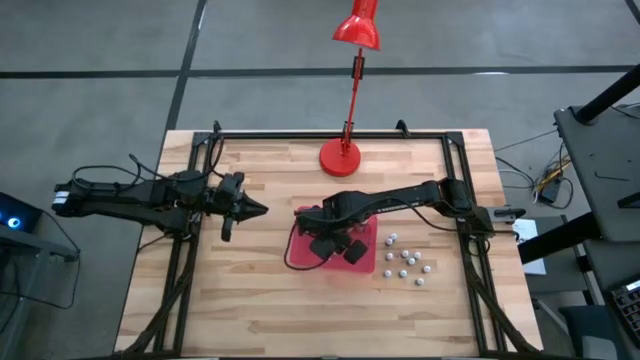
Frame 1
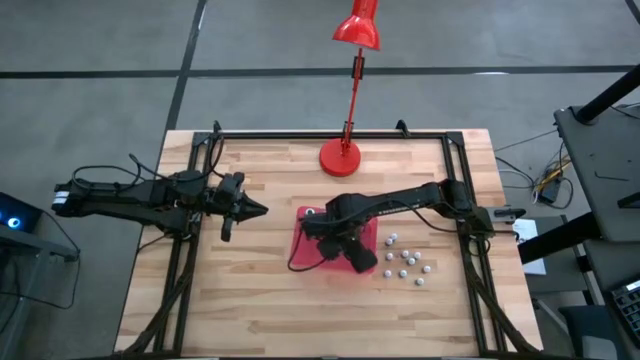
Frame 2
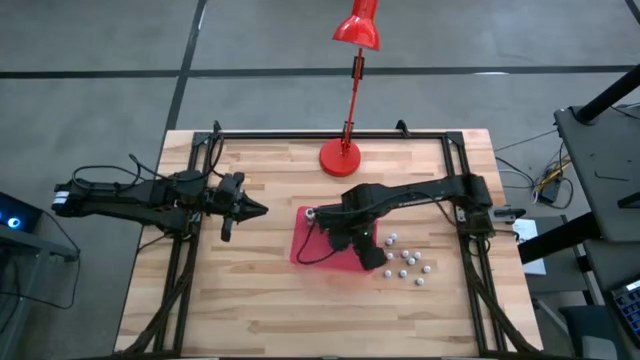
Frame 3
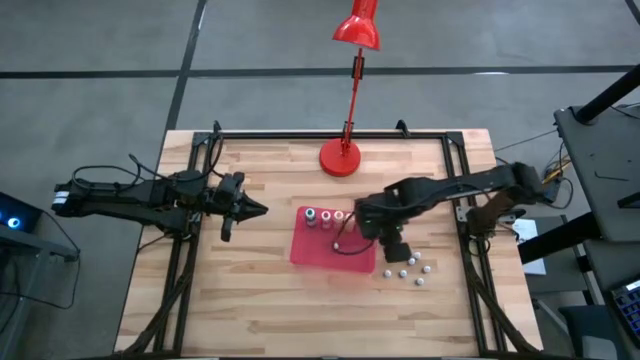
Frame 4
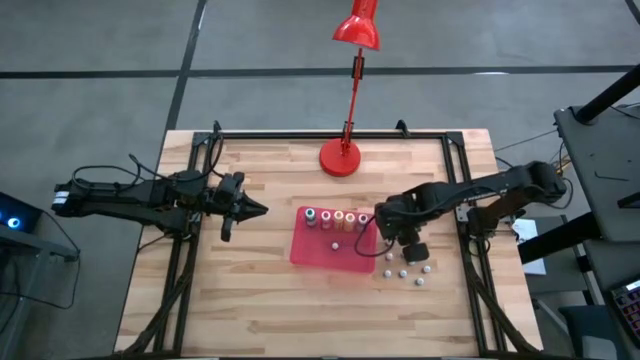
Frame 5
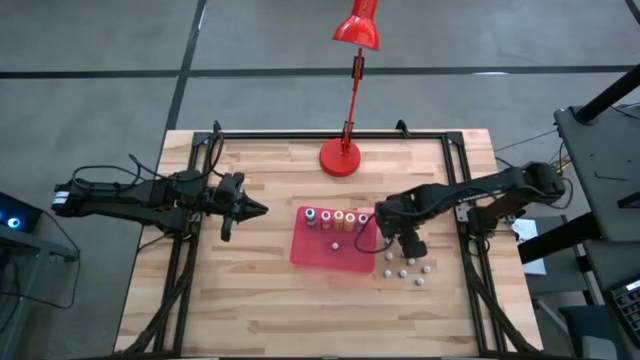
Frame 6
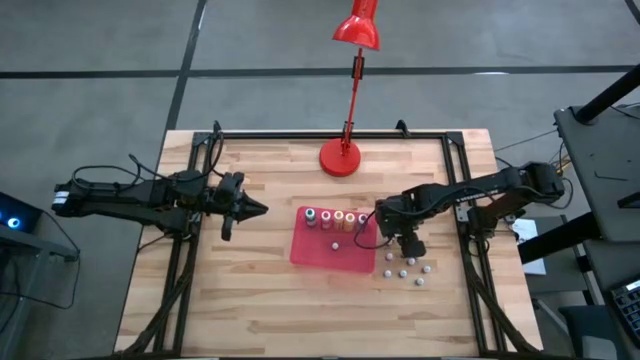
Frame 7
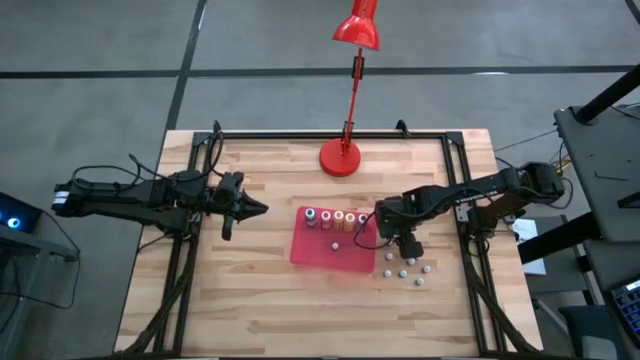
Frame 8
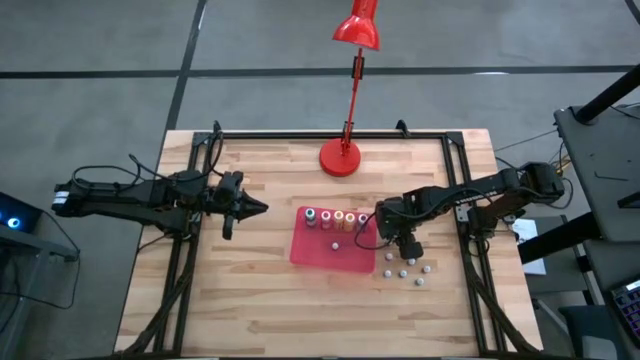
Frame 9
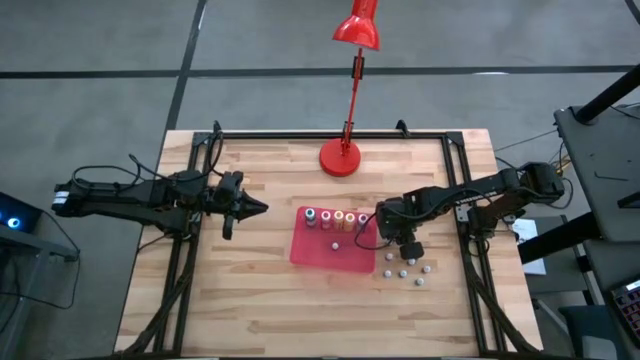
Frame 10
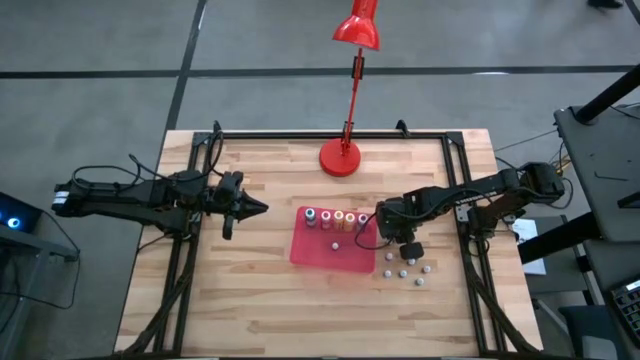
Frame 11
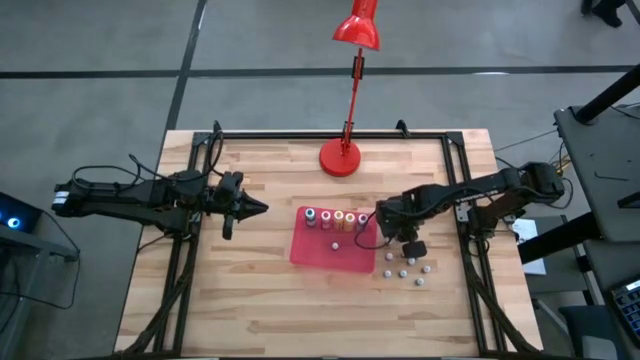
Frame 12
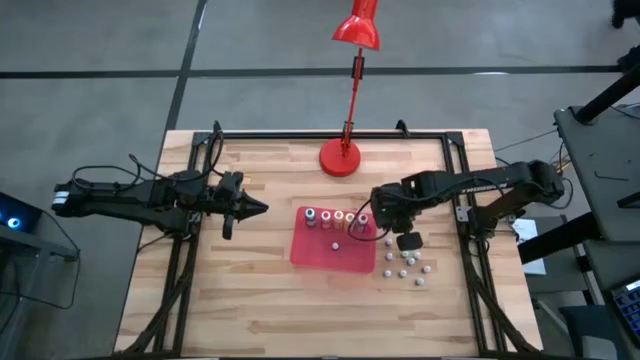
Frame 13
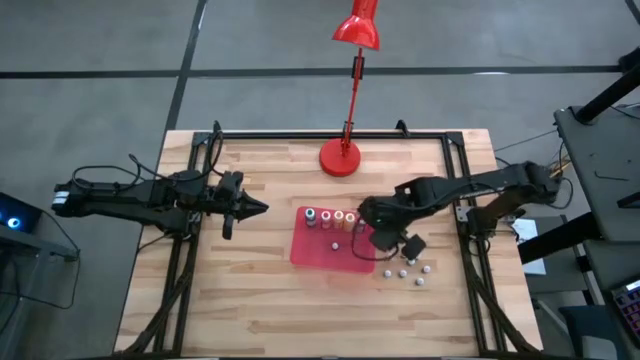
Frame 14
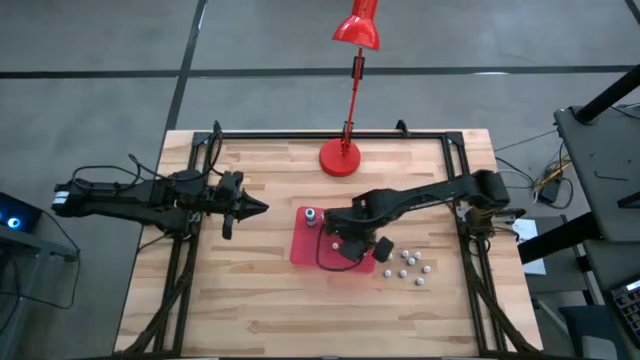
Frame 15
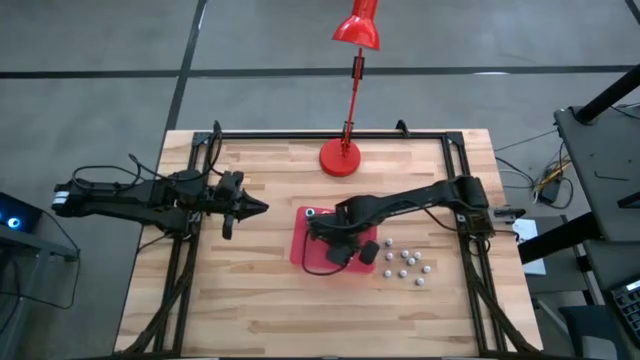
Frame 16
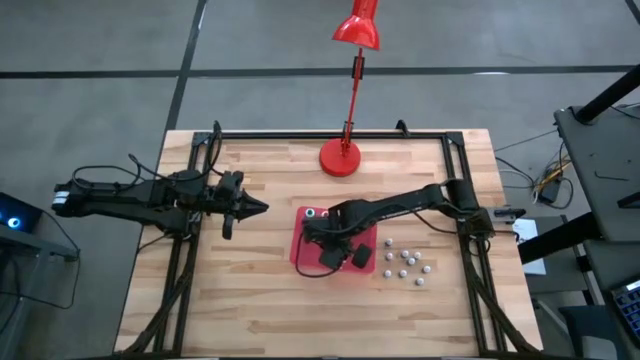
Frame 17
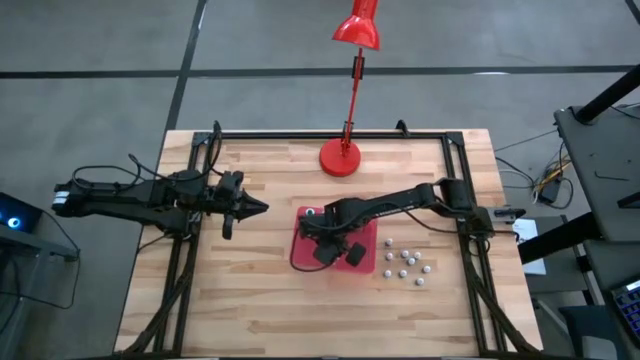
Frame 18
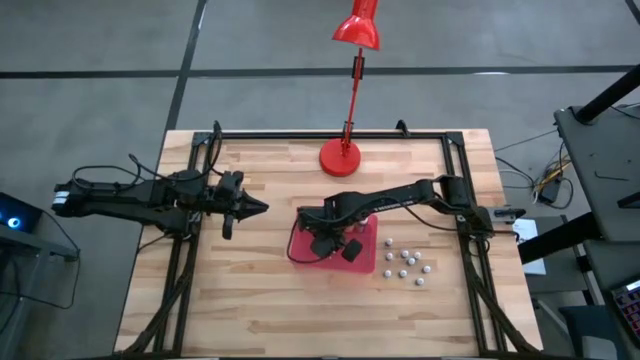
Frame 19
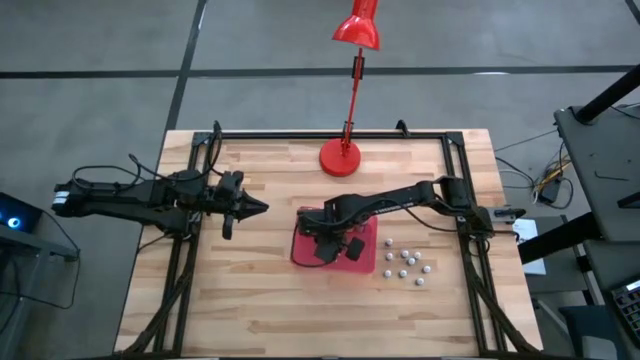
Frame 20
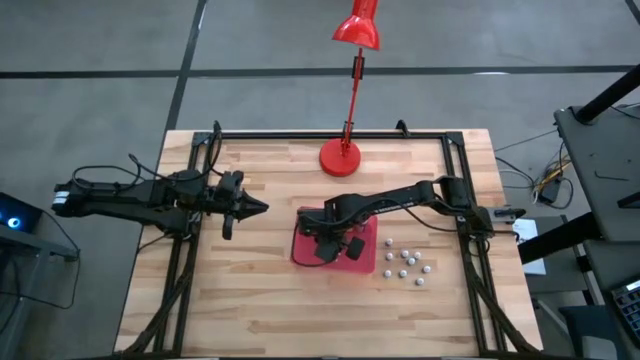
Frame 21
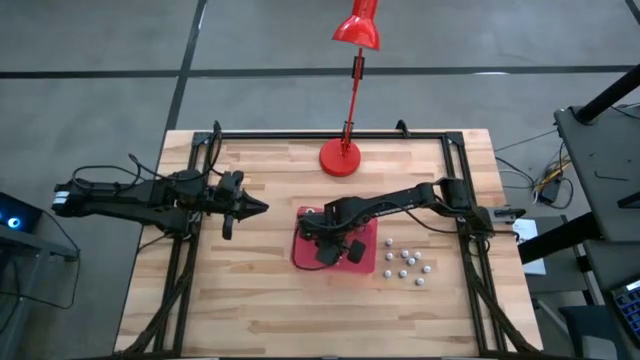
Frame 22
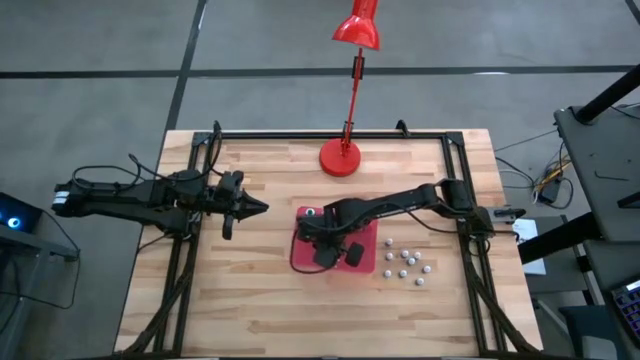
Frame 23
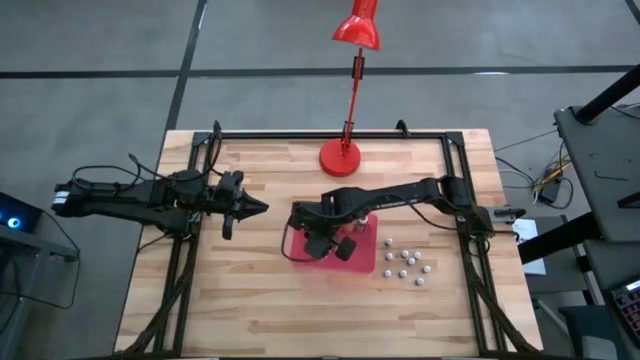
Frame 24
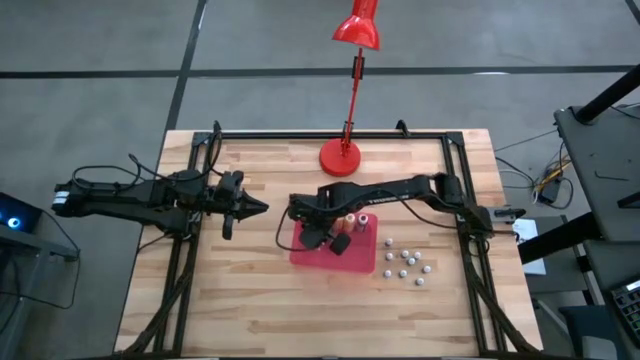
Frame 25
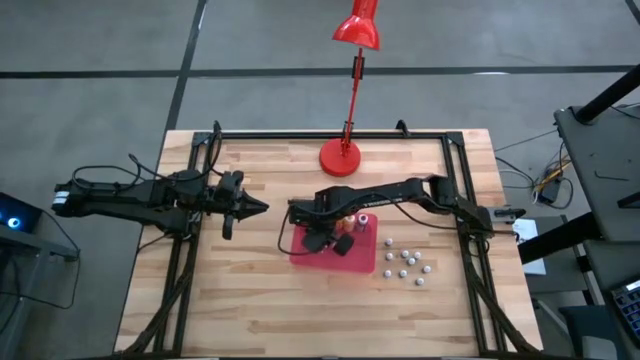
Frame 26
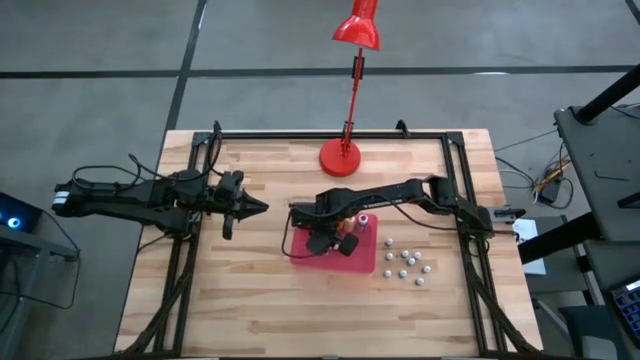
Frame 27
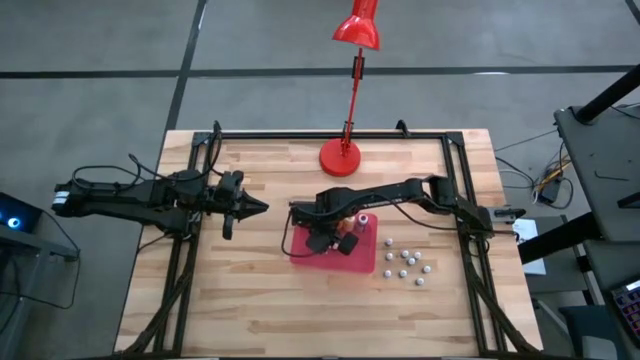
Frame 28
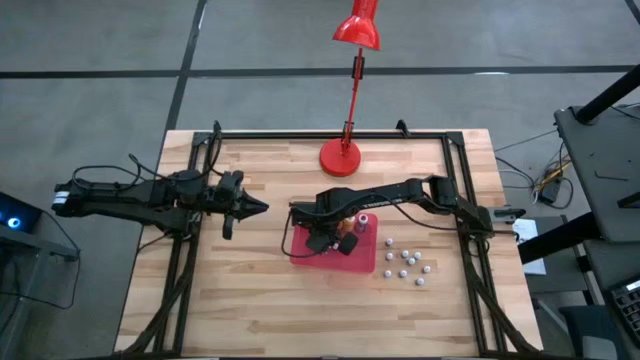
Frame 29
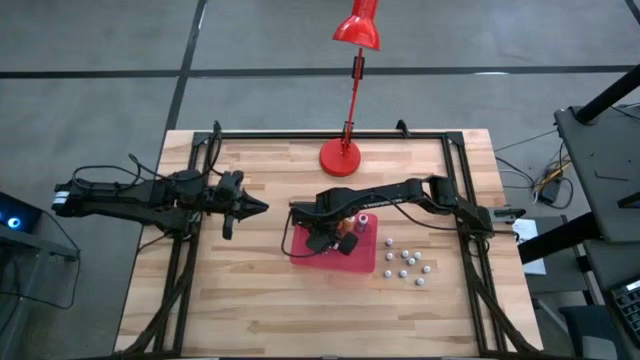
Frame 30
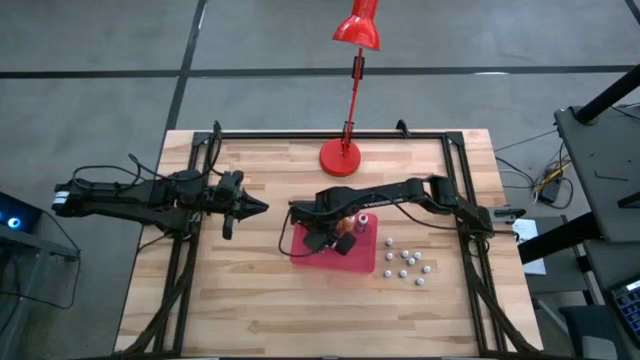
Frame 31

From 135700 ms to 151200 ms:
Task: Pick & Place food coloring
Put the small black food coloring bottle into the red bin

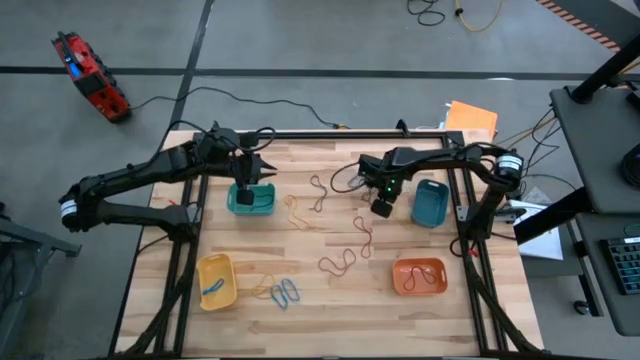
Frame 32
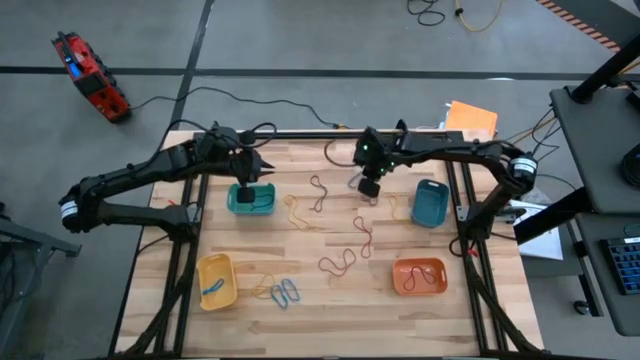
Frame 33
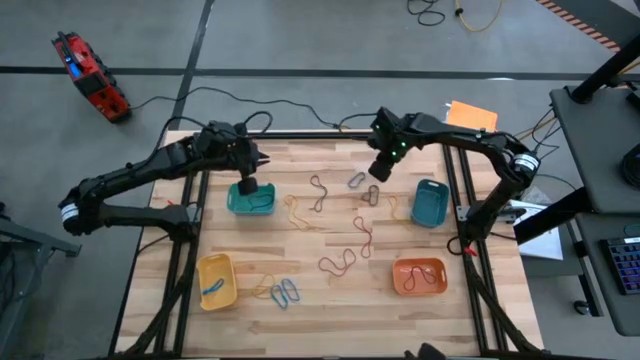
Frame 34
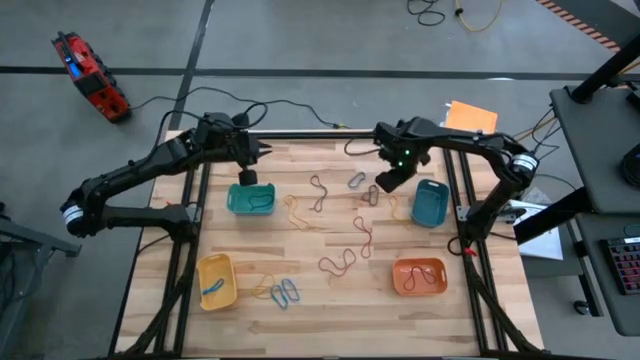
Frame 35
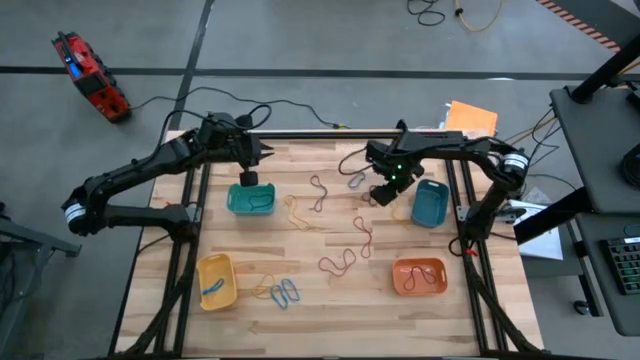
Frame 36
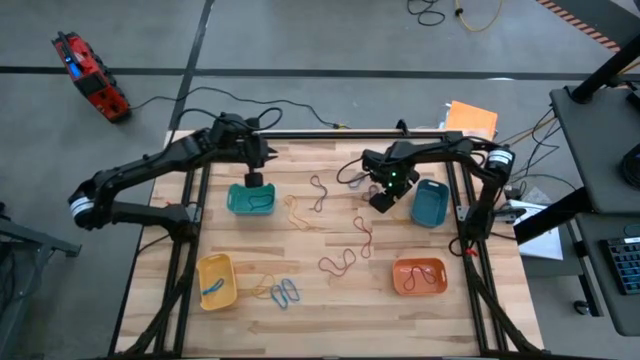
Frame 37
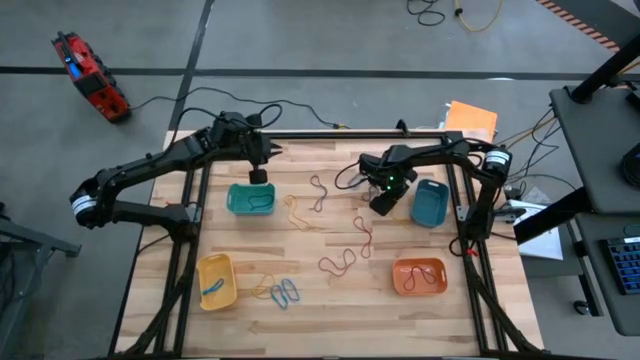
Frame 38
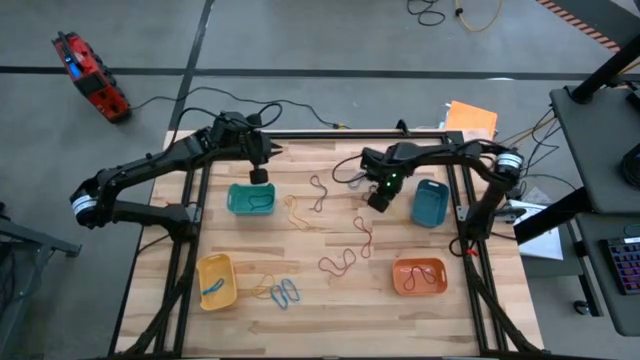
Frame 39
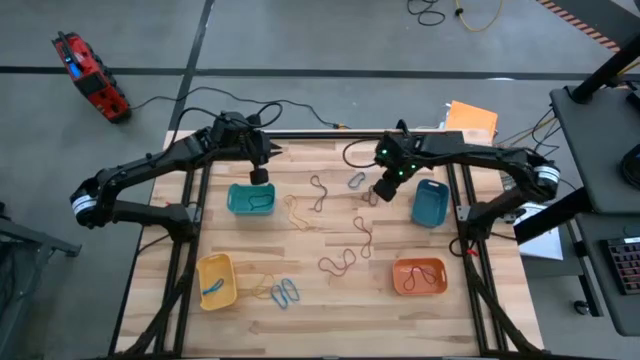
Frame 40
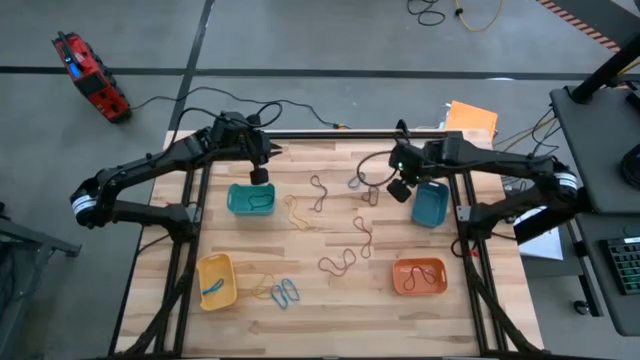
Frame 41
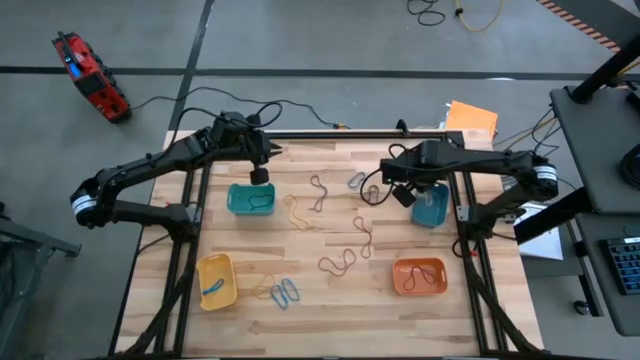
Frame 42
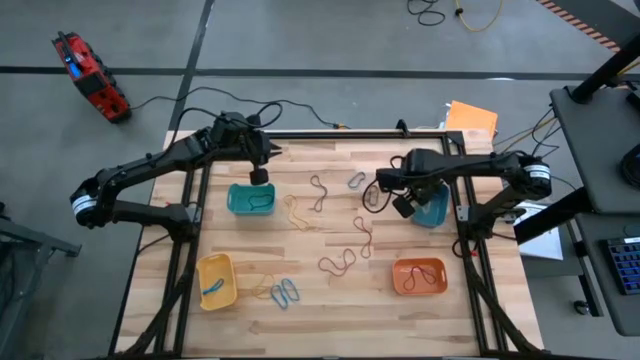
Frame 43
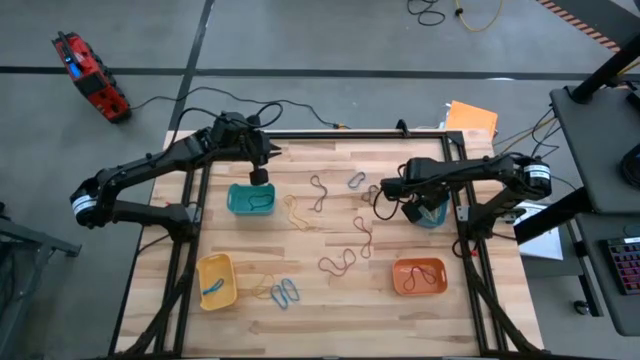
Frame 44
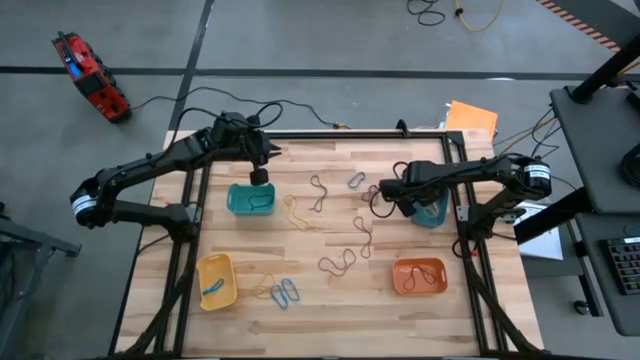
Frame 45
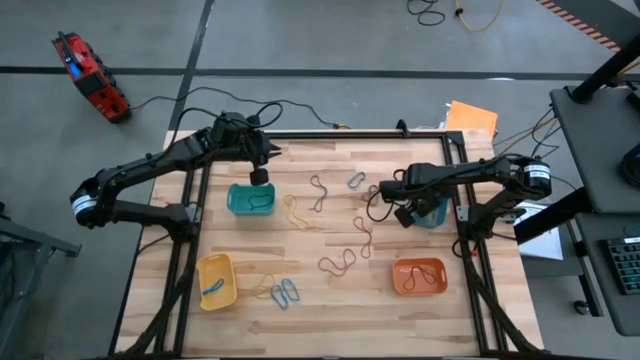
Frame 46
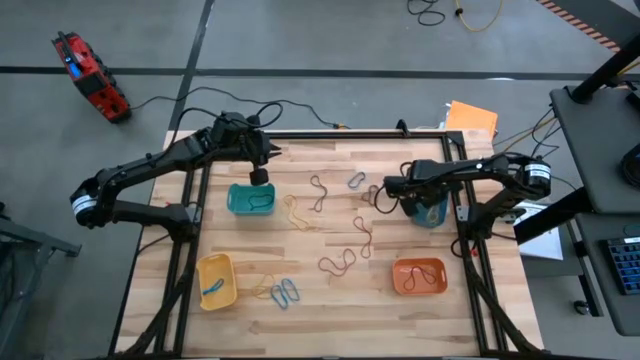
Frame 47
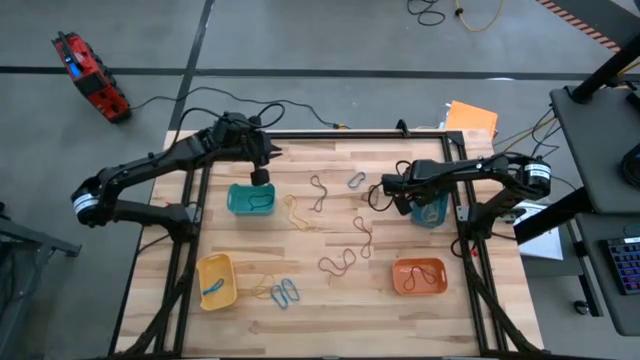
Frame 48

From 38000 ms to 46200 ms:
Task: Sort rubber bands into baskets
Put the yellow rubber band into the blue bin
